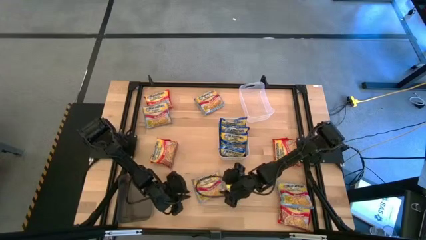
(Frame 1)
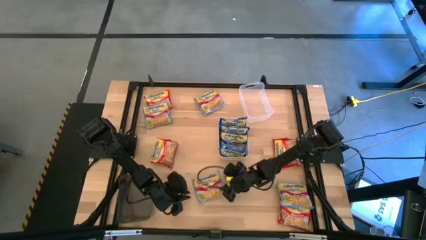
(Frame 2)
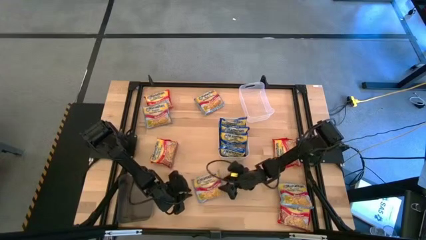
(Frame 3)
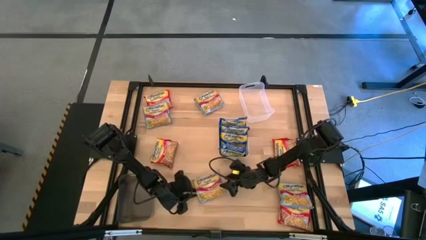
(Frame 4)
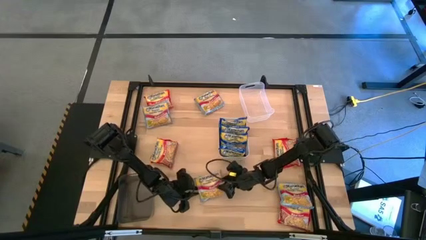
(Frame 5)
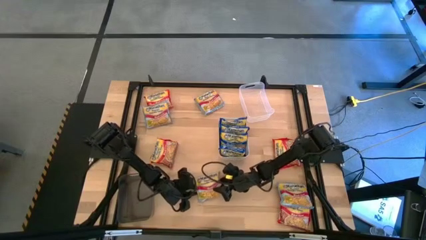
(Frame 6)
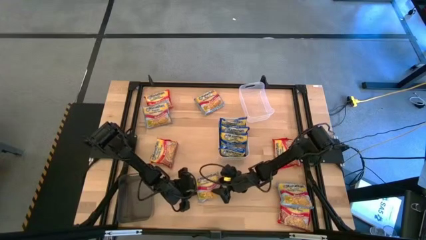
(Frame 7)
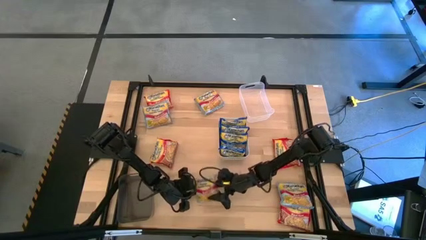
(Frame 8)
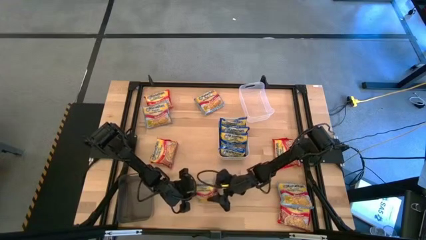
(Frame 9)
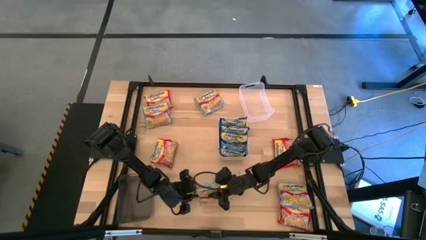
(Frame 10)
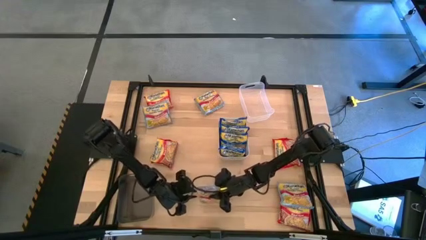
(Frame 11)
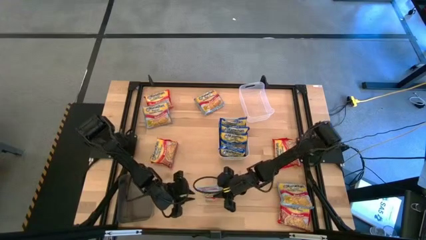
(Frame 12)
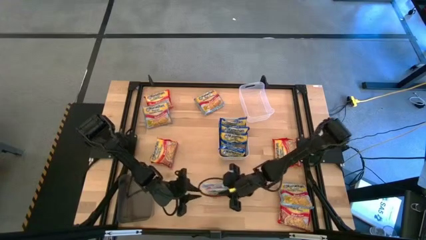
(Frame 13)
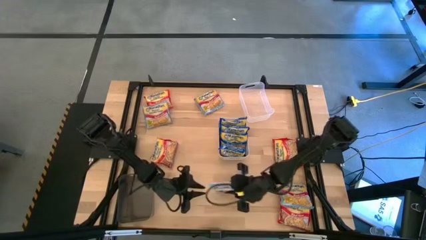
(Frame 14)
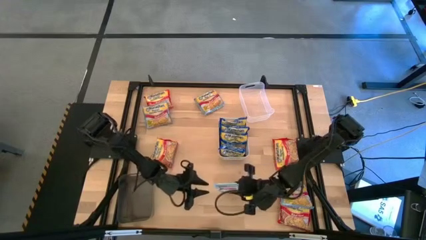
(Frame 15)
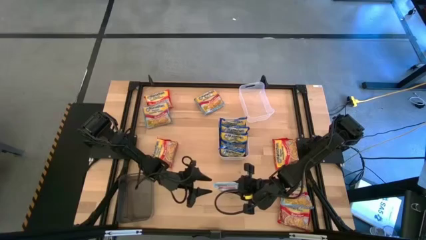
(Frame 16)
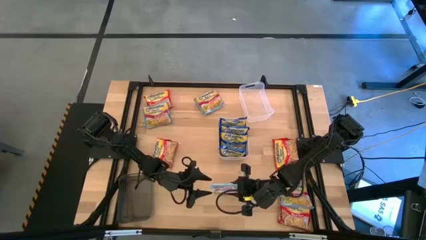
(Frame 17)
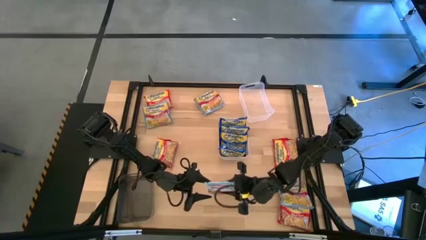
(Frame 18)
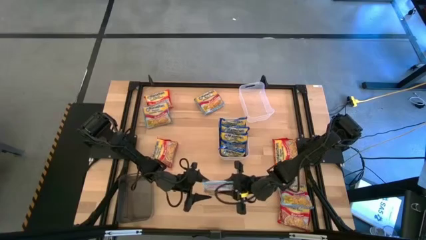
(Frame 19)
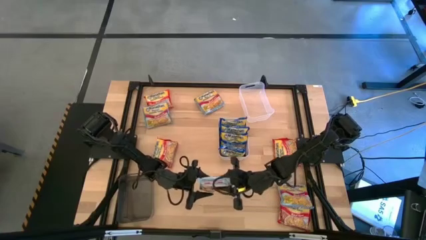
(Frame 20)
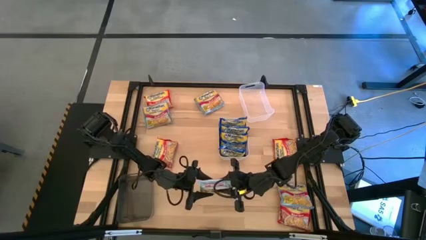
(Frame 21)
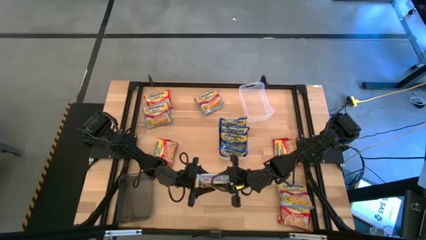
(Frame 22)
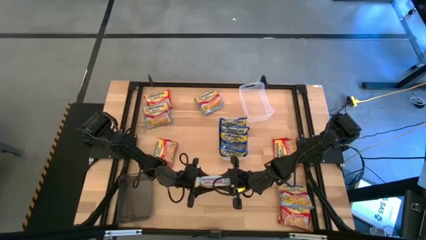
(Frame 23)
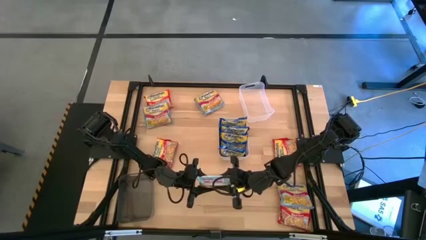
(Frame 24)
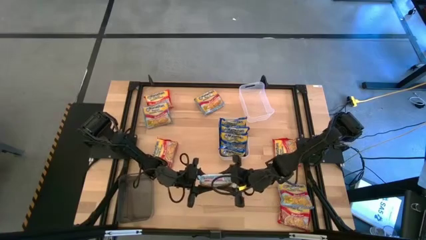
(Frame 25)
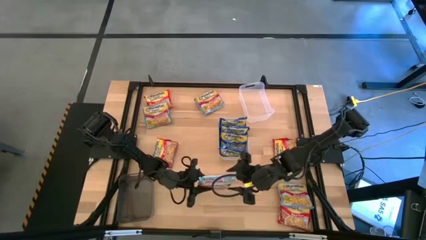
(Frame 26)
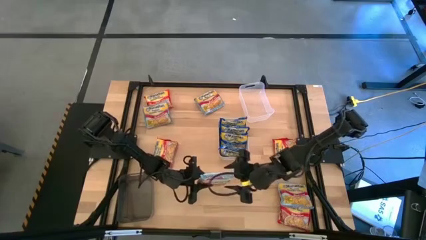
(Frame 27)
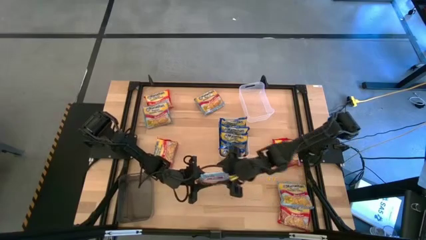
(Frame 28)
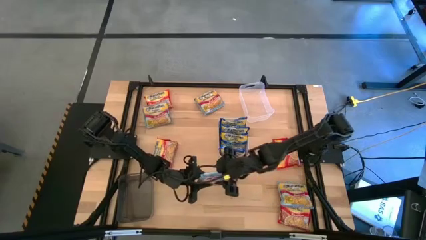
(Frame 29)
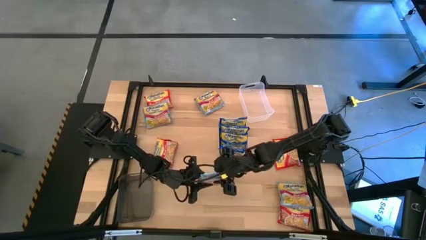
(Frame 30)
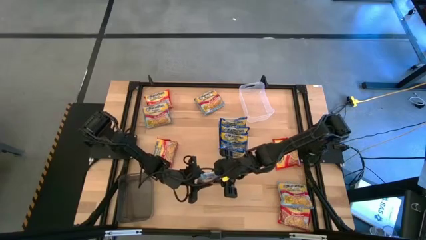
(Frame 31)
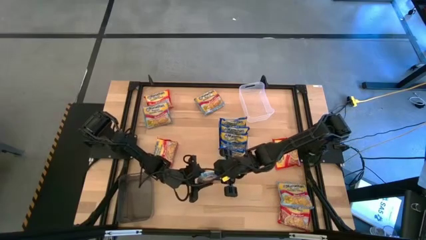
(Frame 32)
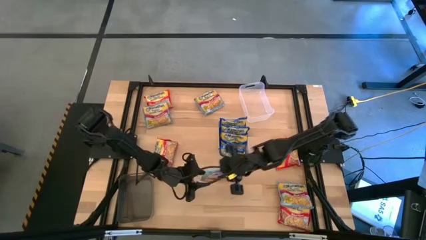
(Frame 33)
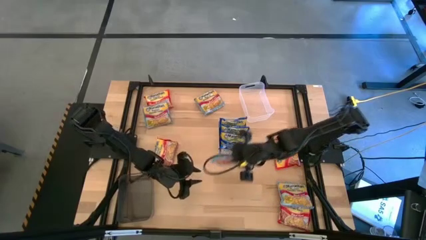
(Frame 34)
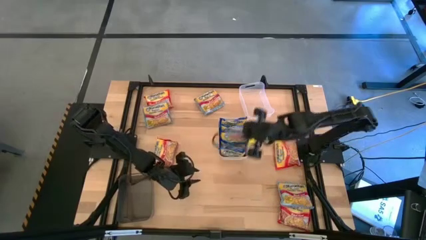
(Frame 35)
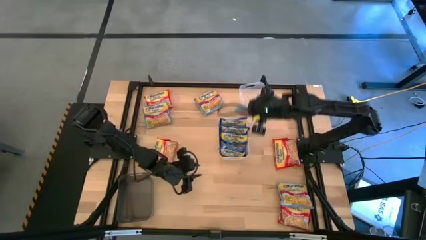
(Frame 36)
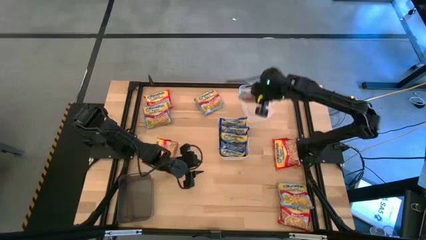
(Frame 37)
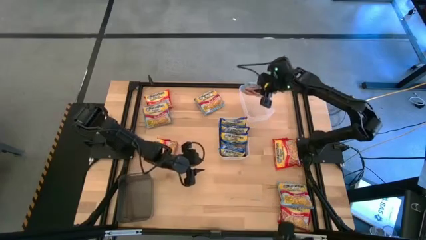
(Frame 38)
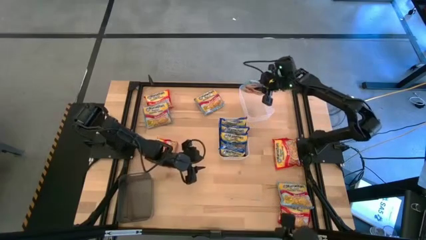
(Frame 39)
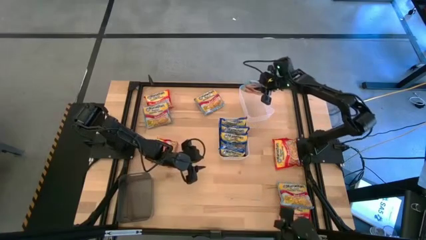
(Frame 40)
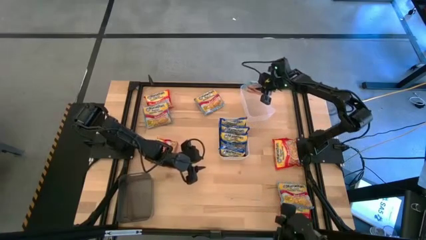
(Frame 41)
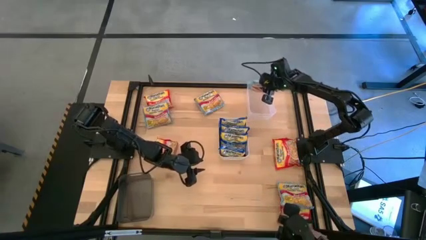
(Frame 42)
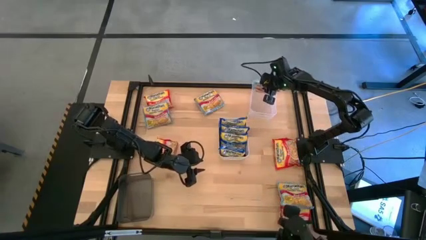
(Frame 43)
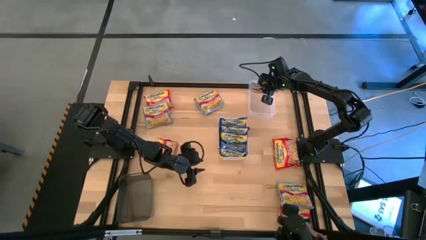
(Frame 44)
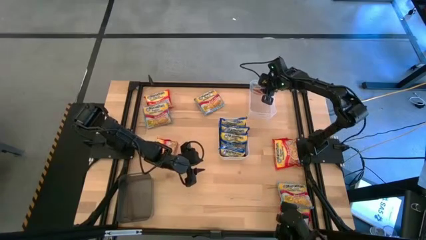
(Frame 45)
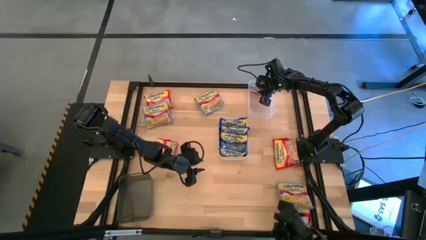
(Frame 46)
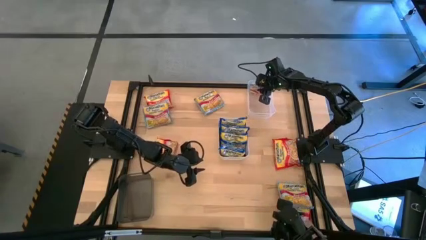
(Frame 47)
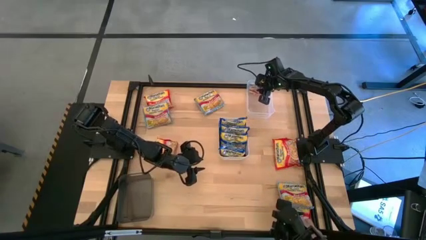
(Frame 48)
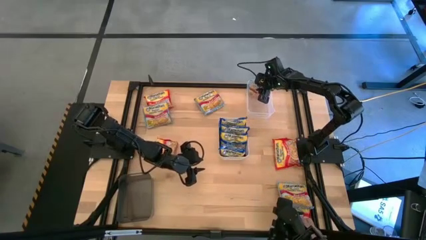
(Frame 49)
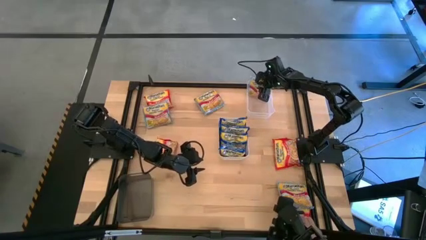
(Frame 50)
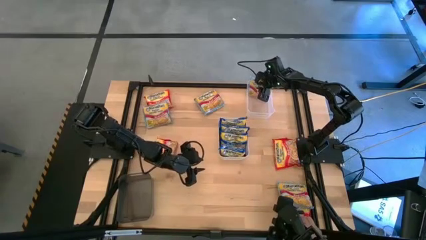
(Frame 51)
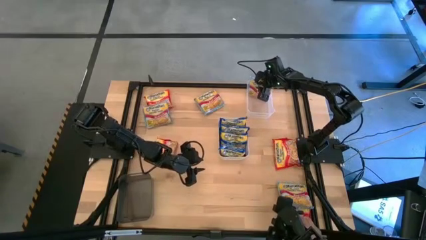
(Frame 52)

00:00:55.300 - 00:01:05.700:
Task: Sort Maruchan noodles
Put the light blue noodle pack in the transparent bin
